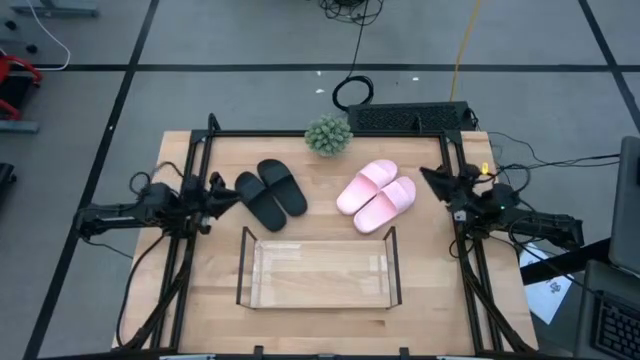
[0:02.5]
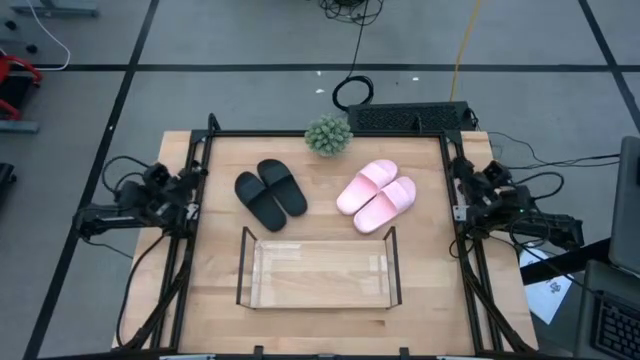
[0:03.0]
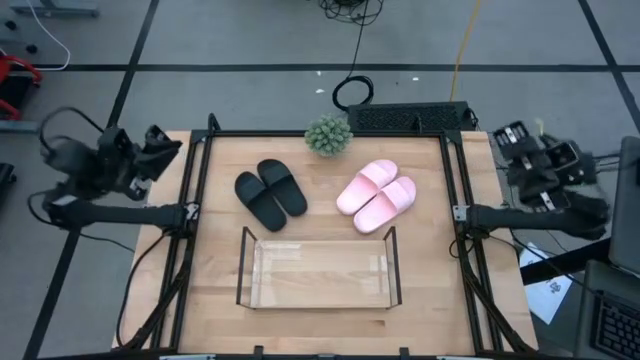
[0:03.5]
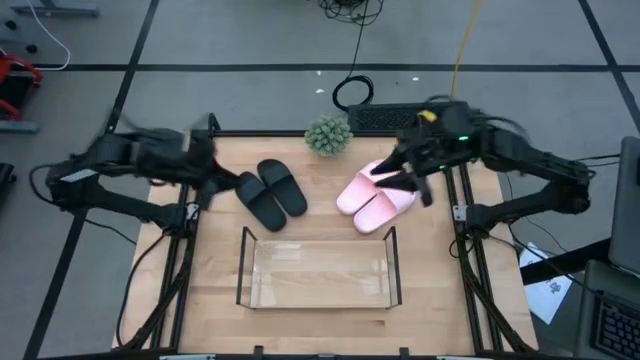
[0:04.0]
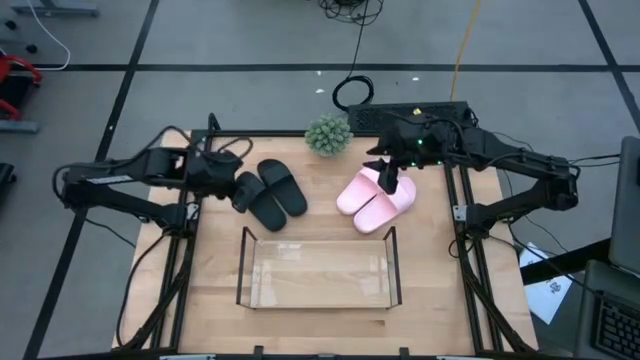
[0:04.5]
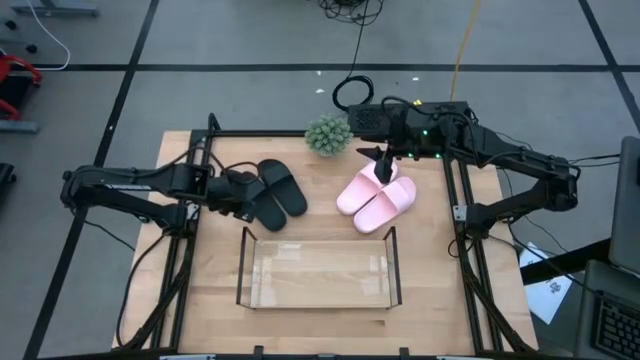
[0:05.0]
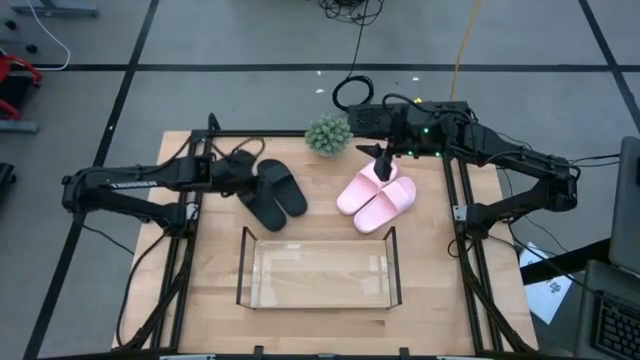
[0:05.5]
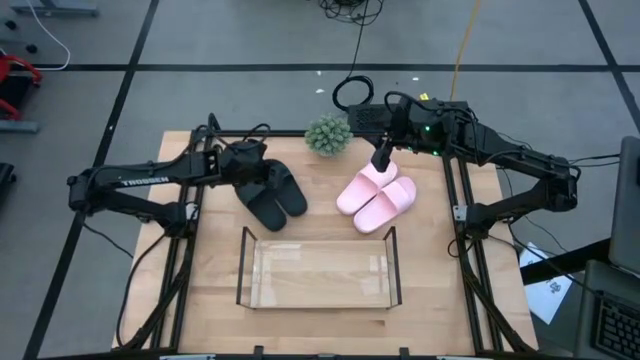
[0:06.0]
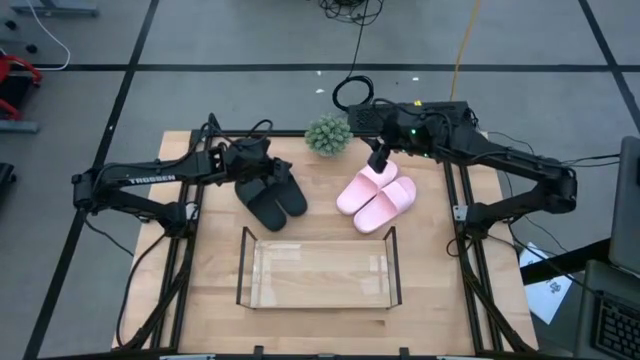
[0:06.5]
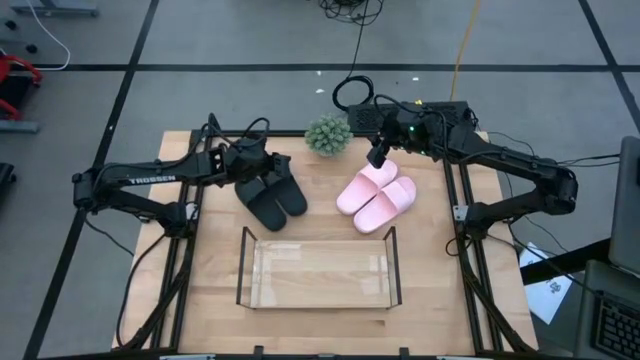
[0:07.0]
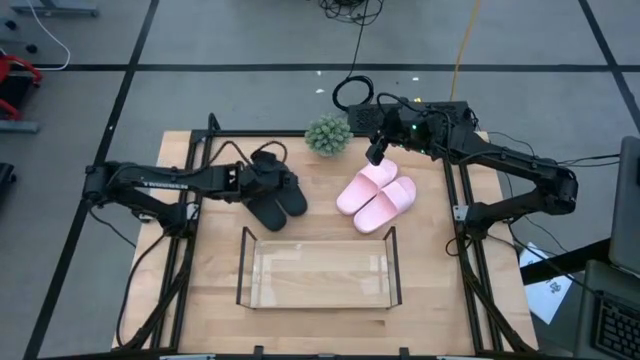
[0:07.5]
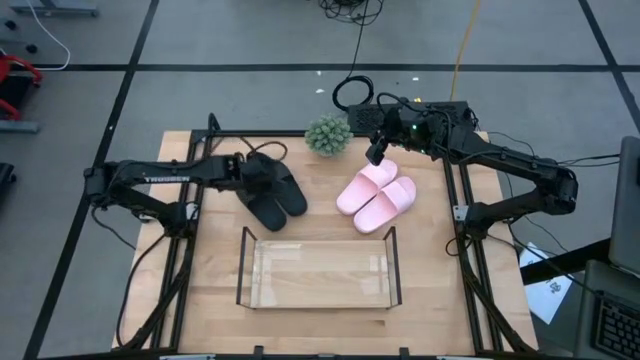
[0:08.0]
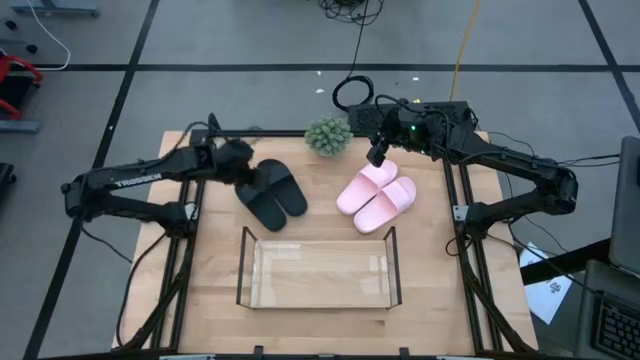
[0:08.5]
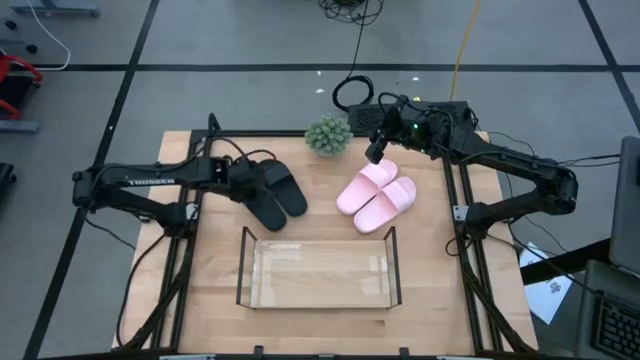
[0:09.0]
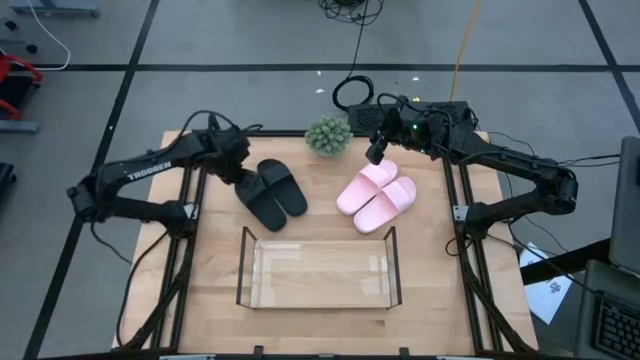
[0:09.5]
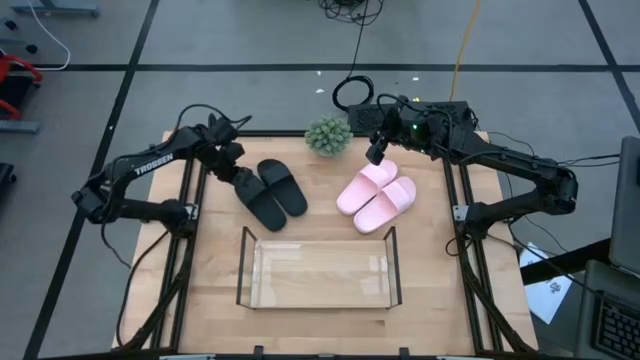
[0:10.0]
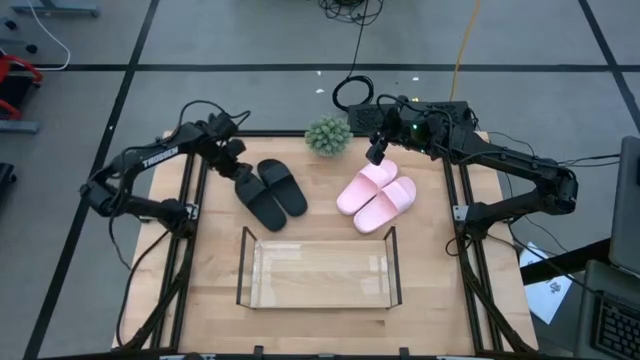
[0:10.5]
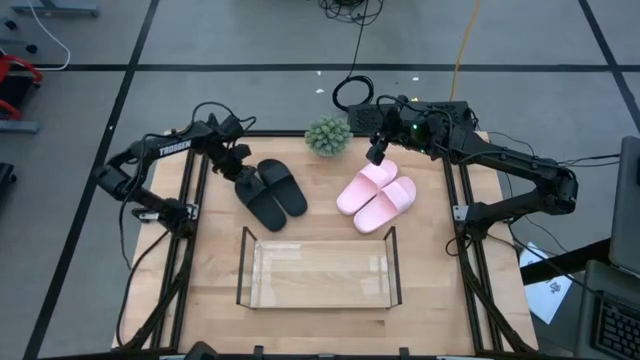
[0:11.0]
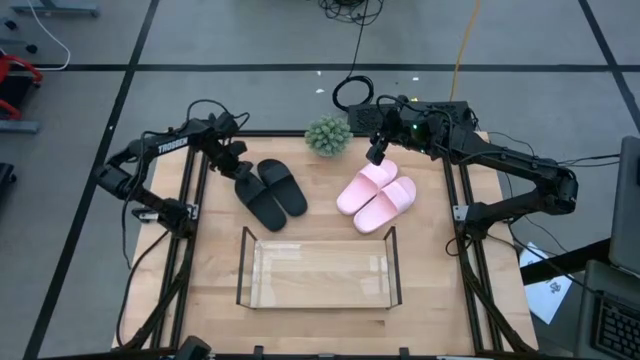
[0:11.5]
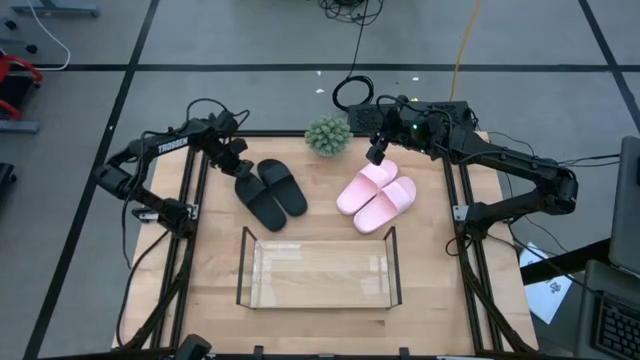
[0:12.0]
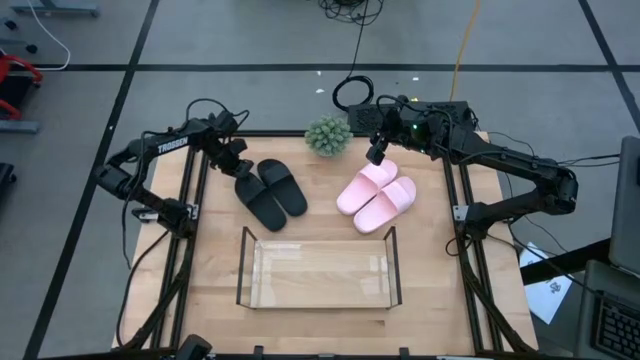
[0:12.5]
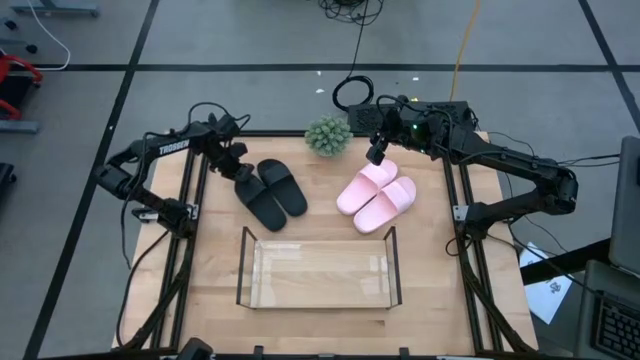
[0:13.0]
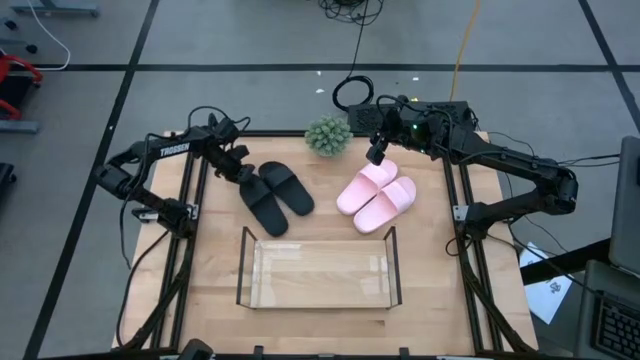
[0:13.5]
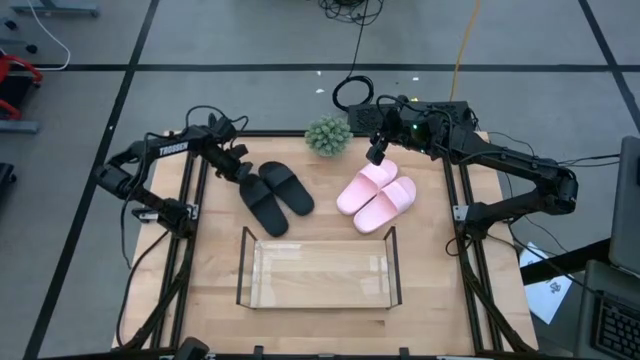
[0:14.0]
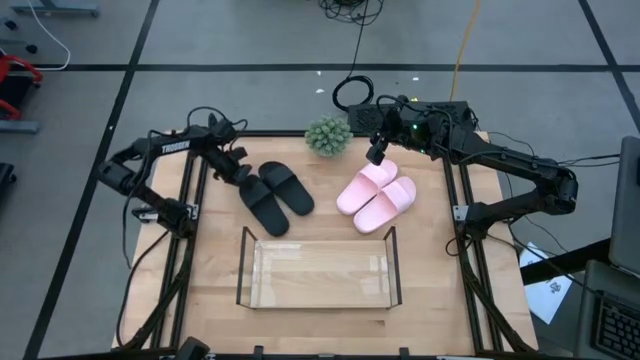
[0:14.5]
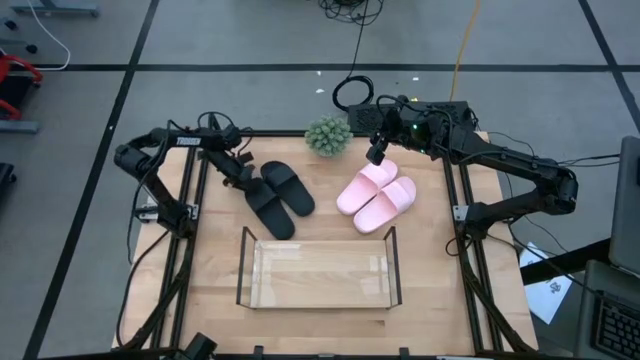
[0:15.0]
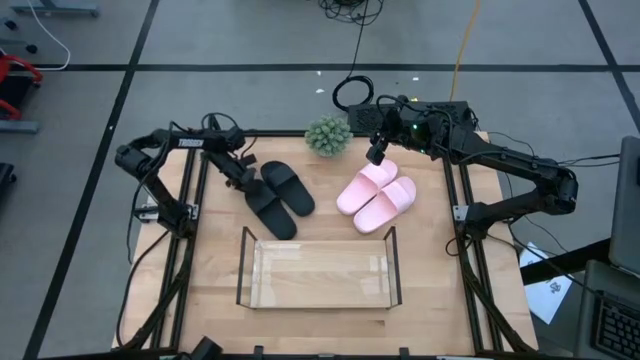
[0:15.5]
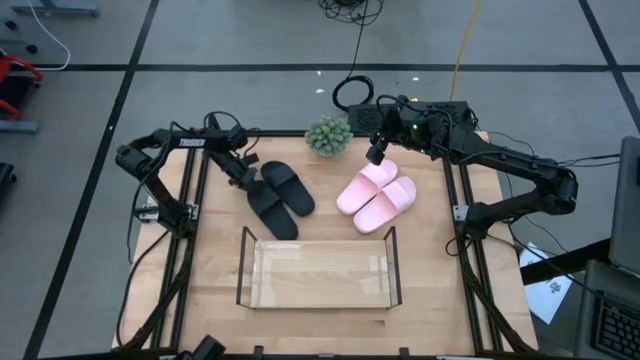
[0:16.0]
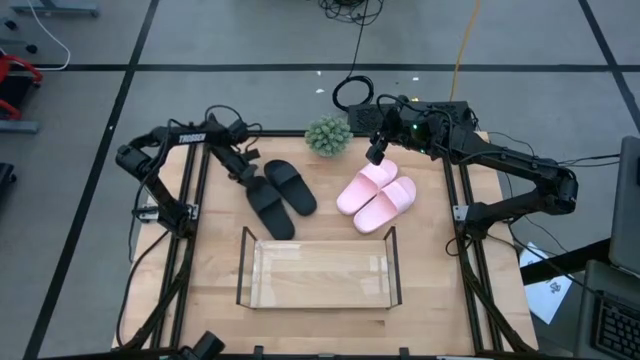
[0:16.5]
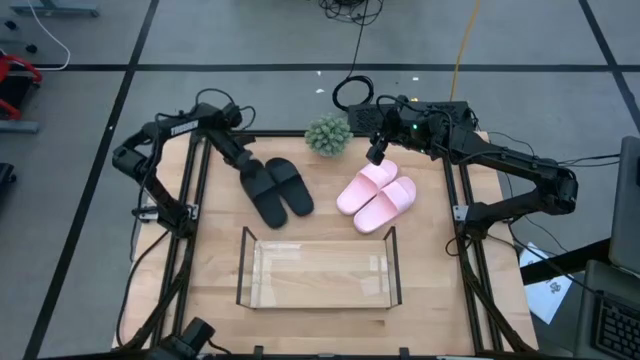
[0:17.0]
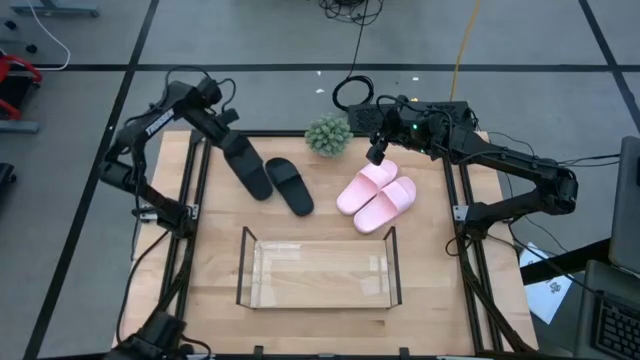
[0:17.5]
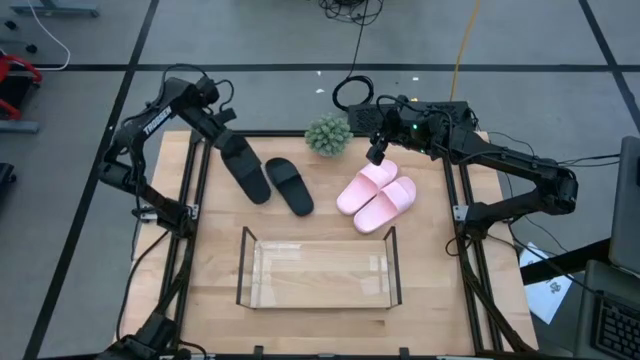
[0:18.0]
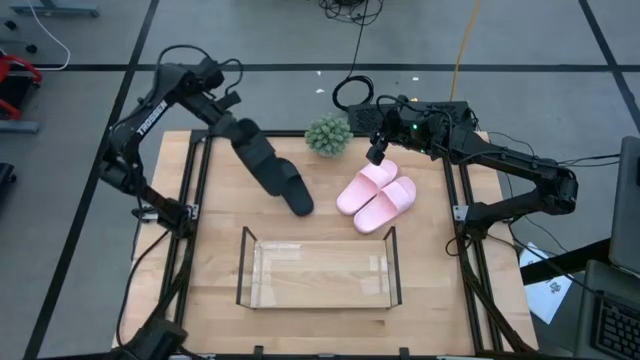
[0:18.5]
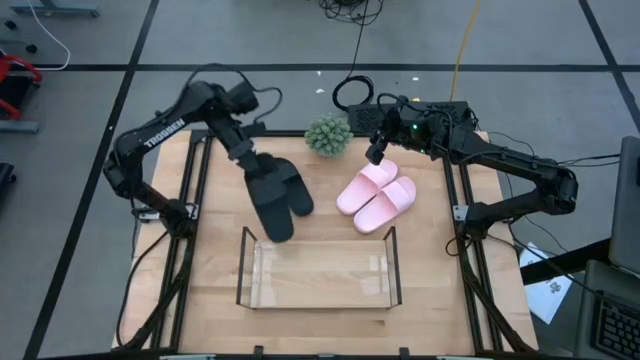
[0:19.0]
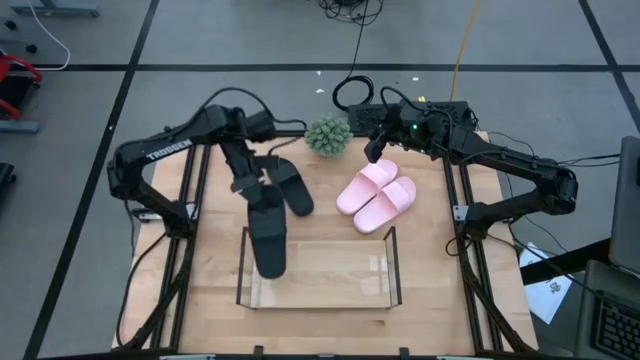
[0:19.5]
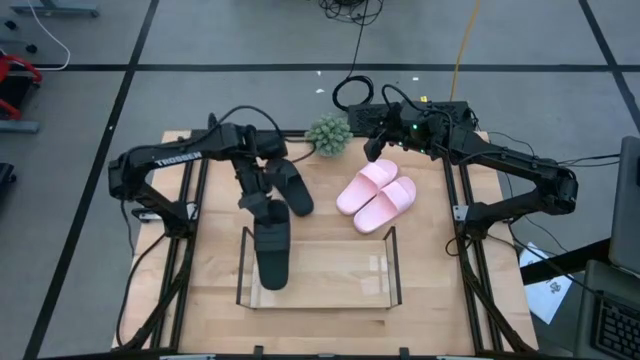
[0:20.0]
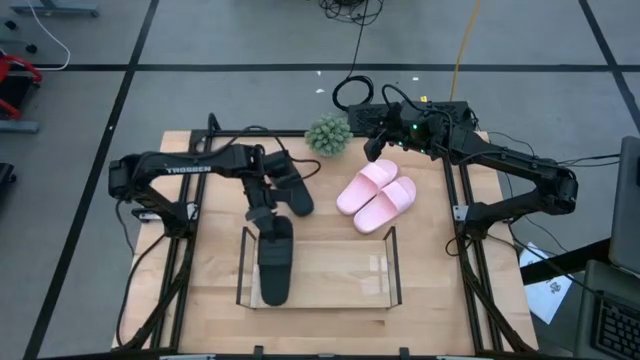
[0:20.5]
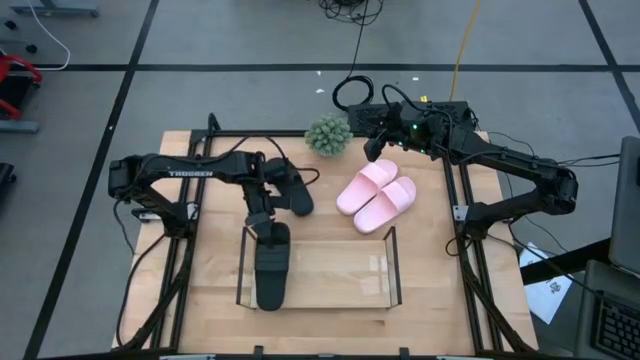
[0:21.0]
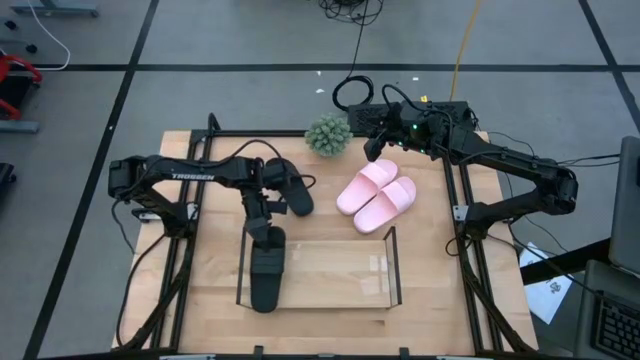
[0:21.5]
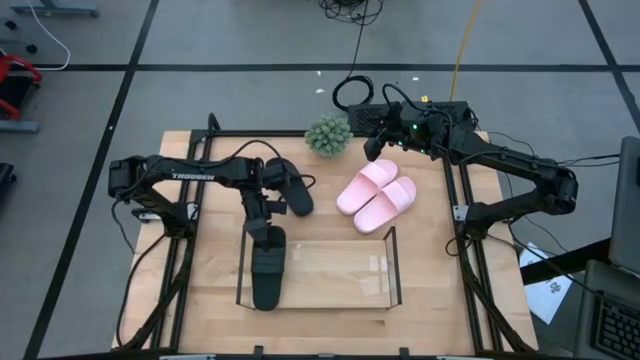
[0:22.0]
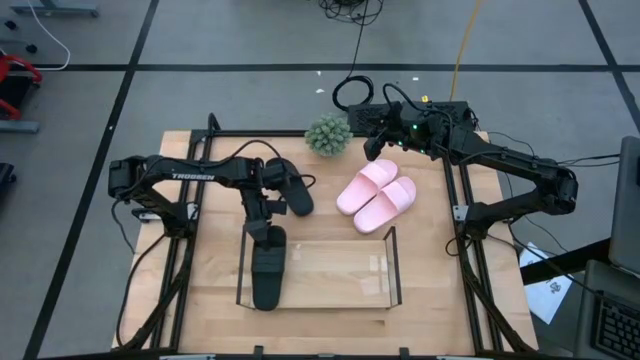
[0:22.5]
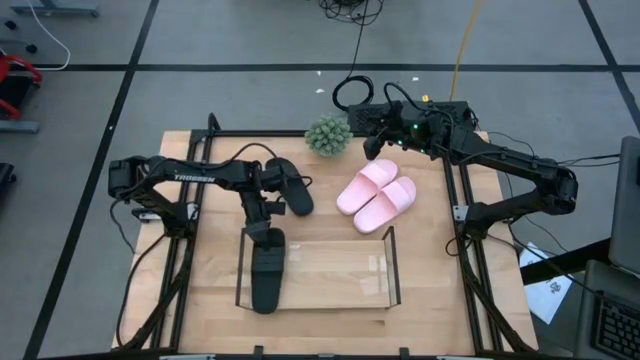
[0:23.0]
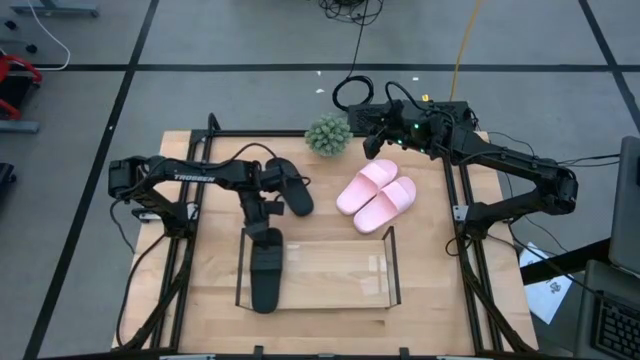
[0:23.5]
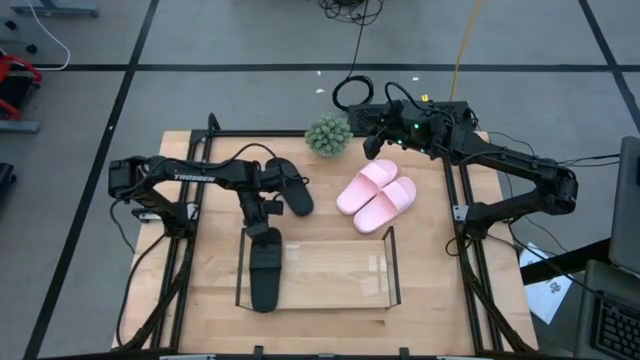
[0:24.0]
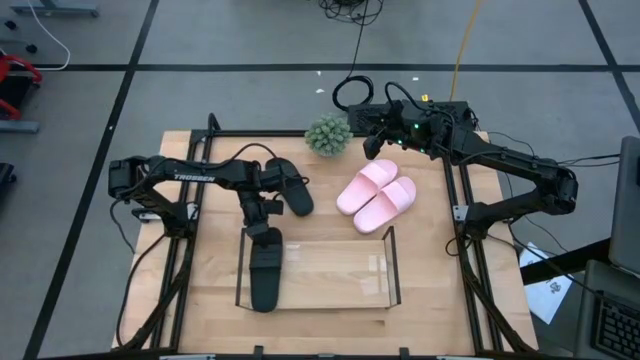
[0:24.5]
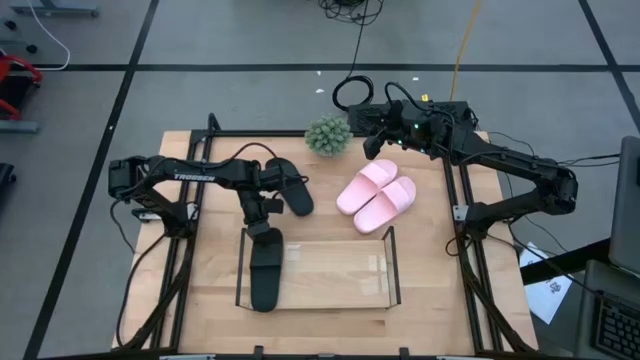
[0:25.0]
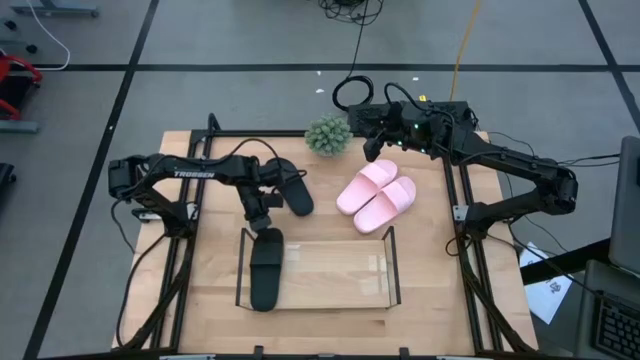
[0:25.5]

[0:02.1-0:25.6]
Task: Pick and place slides into the shelf
Put the left black slipper on the shelf
